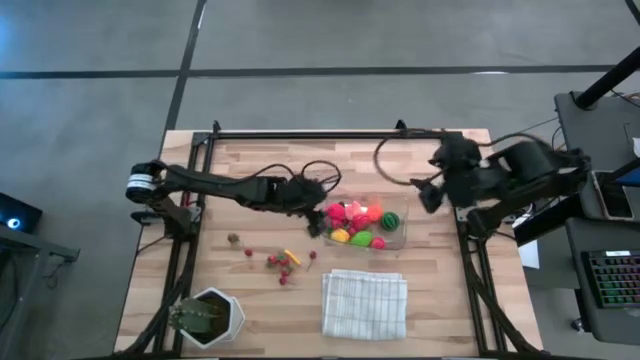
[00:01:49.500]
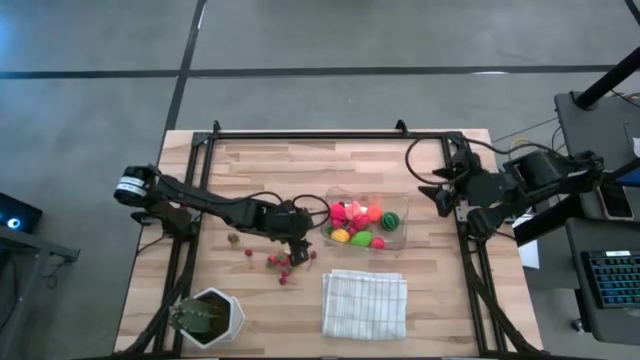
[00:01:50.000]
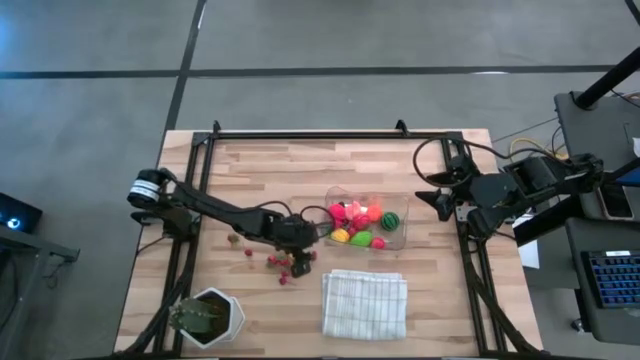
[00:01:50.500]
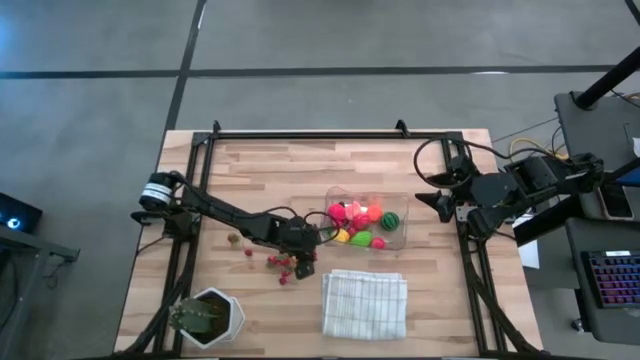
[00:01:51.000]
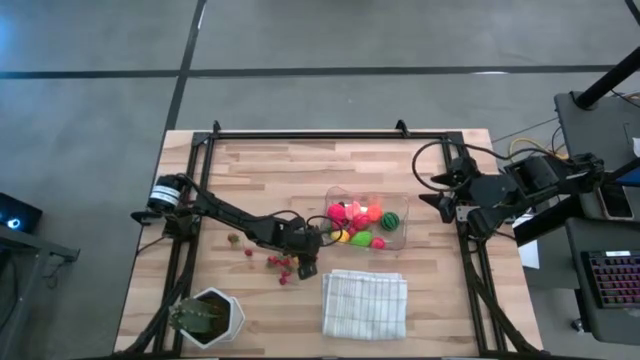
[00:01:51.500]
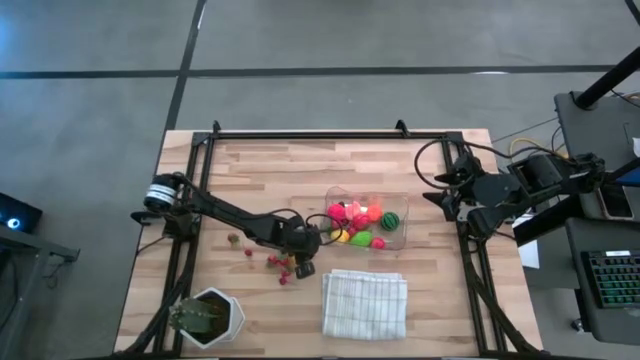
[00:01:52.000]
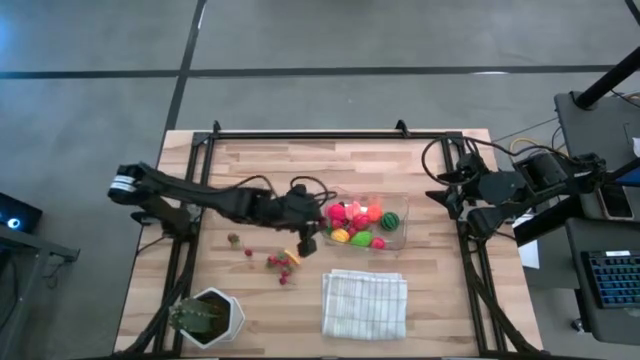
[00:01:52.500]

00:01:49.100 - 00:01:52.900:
Task: Pick and placing Produce into tupperware
Put the red cherry into the transparent bin

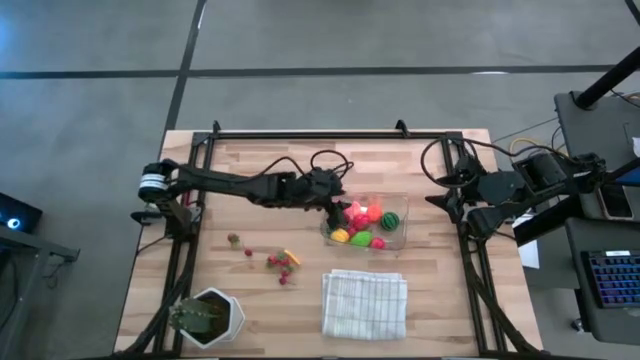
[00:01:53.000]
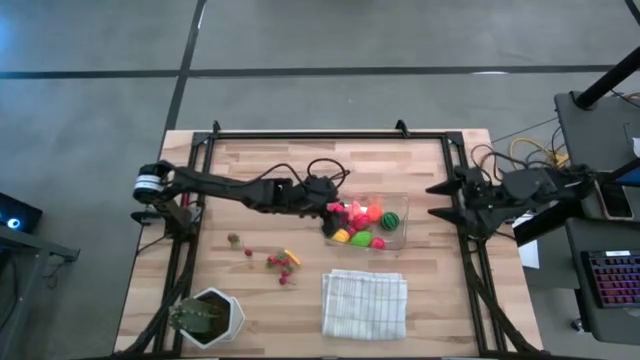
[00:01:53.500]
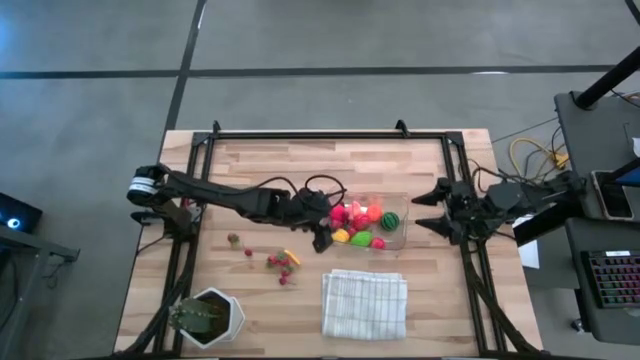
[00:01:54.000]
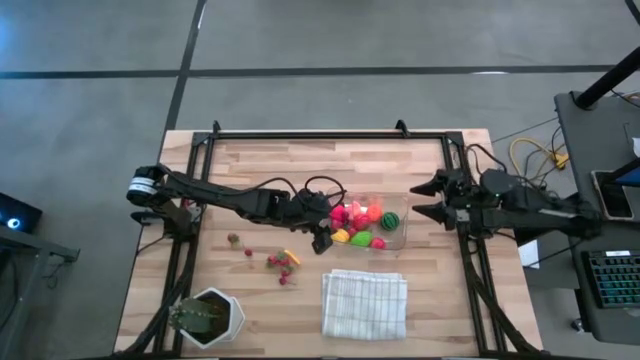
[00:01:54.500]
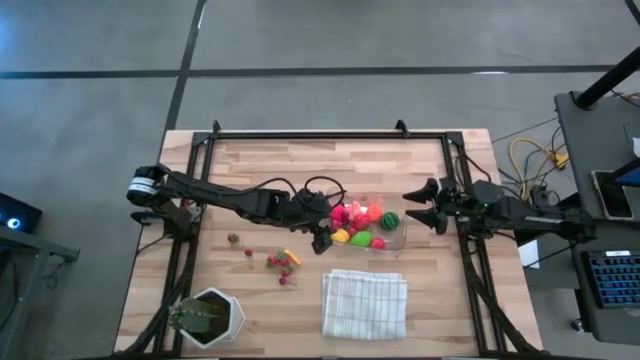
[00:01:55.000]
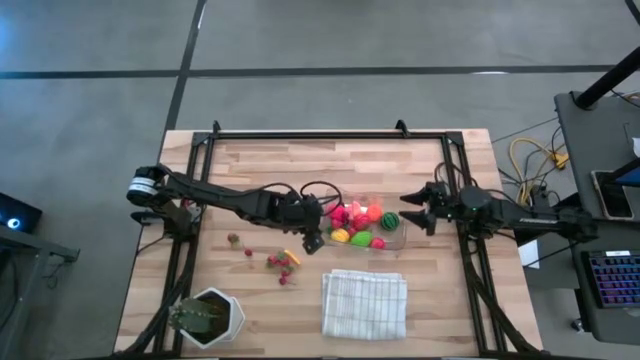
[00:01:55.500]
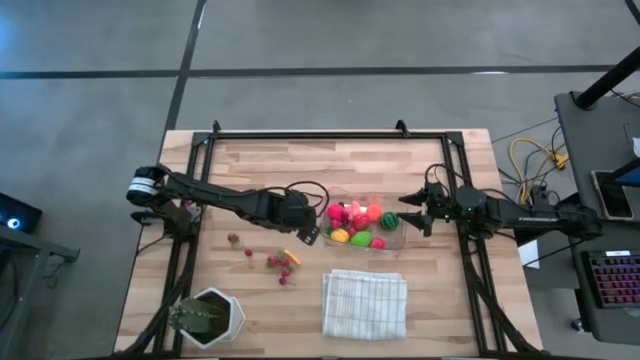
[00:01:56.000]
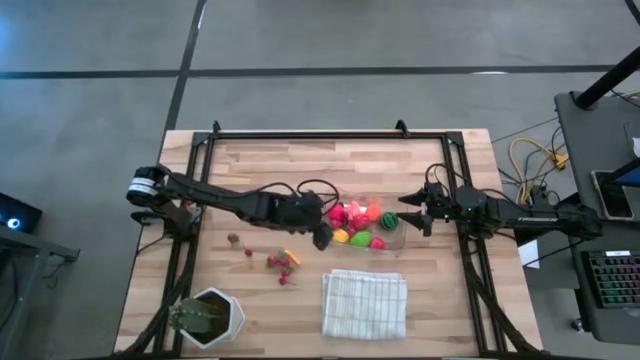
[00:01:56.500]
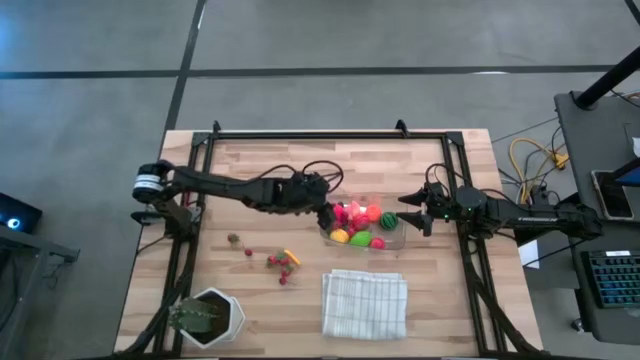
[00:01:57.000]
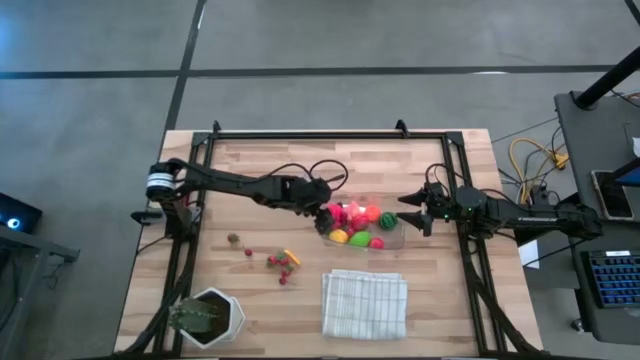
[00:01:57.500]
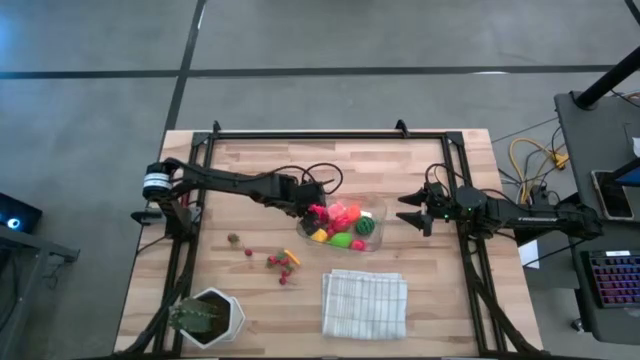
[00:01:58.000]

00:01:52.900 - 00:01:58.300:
Adjust the transparent bin

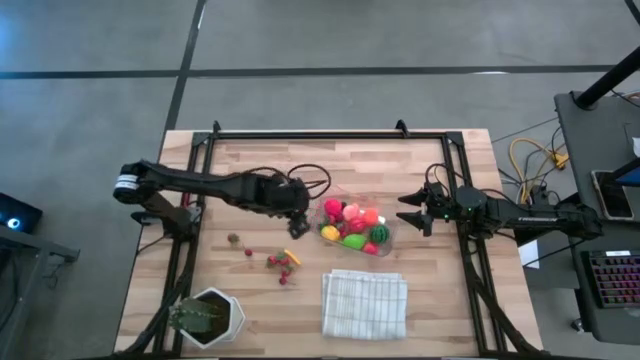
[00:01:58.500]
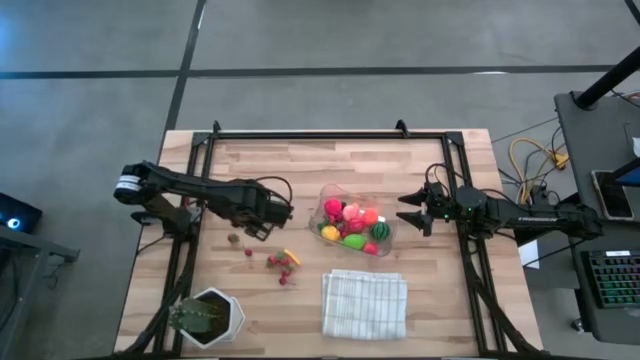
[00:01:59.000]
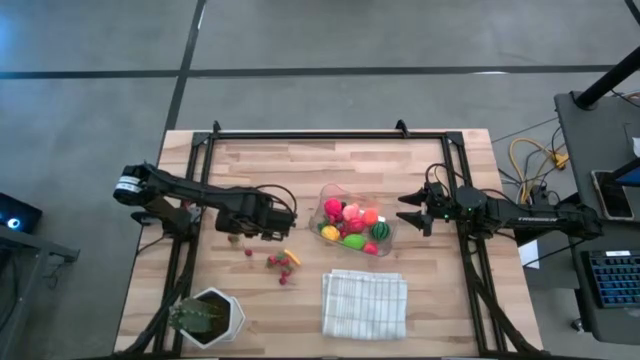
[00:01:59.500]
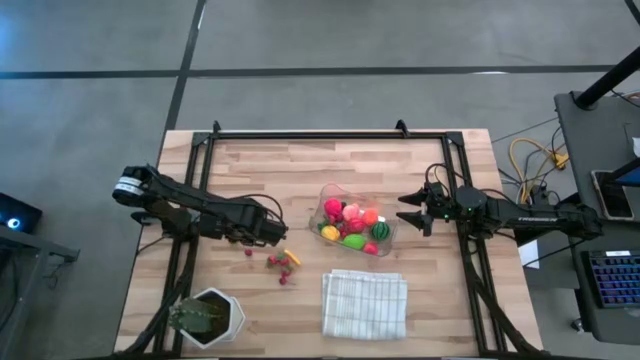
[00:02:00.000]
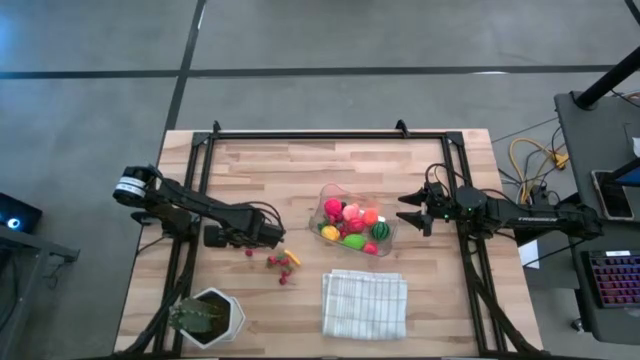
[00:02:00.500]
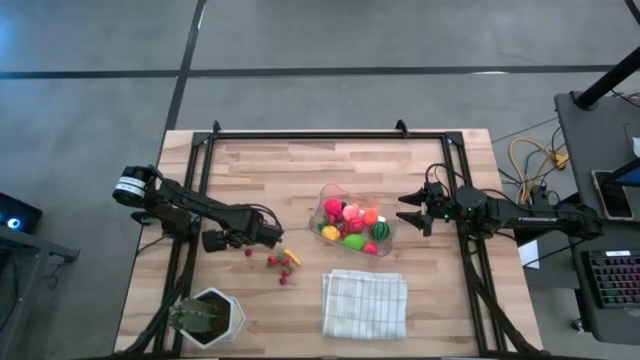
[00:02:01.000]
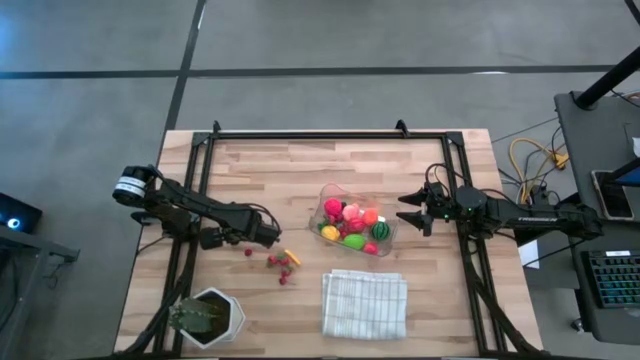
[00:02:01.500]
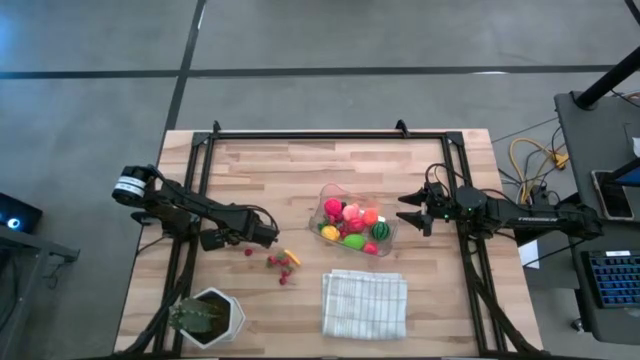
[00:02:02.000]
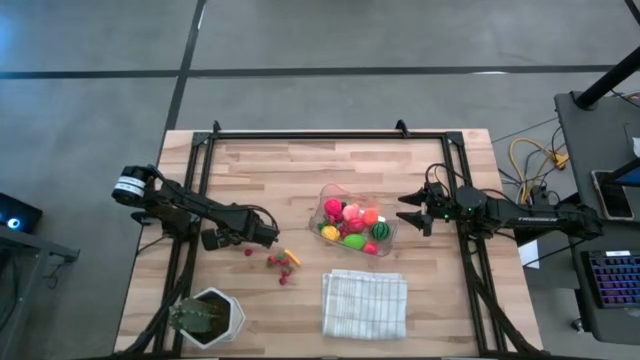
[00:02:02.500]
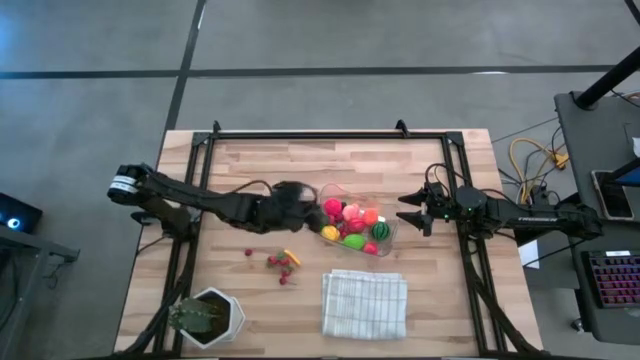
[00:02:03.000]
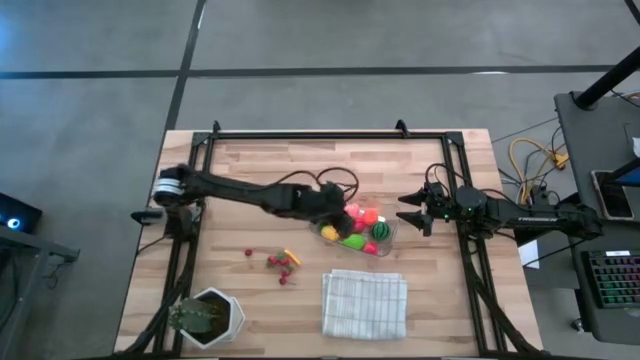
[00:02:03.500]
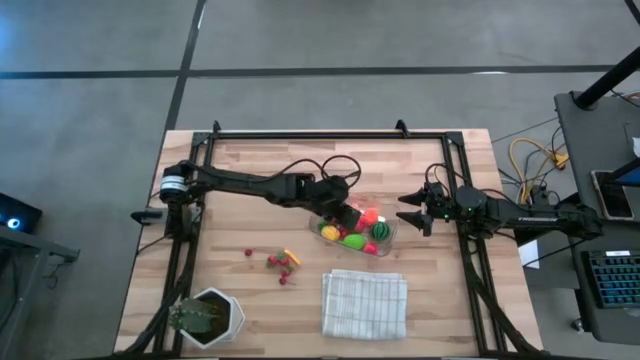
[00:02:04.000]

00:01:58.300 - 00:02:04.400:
Put the red strawberry into the transparent bin

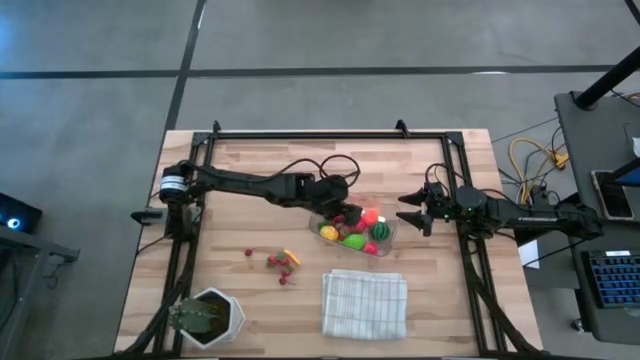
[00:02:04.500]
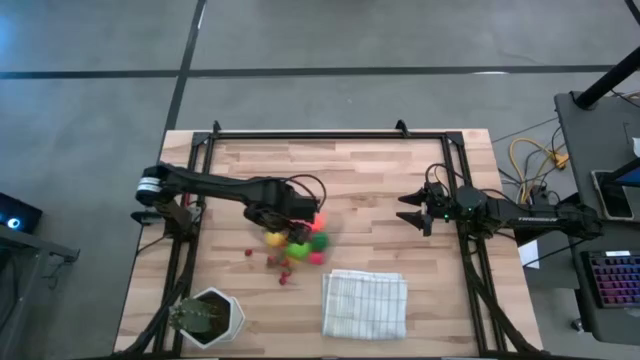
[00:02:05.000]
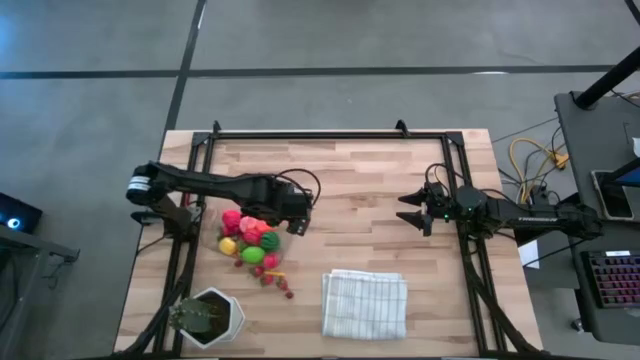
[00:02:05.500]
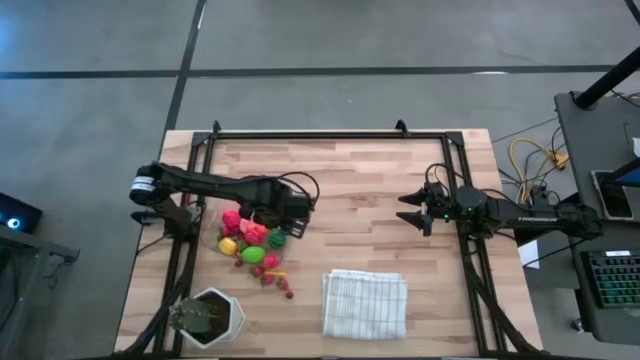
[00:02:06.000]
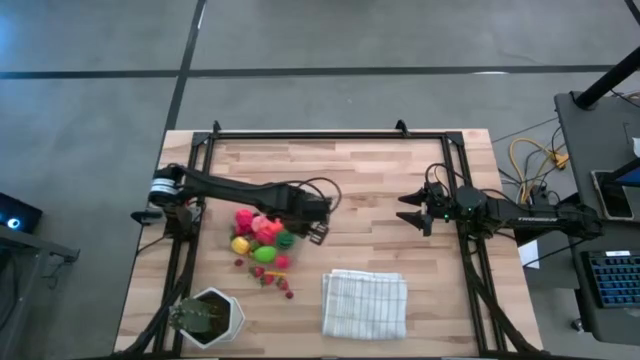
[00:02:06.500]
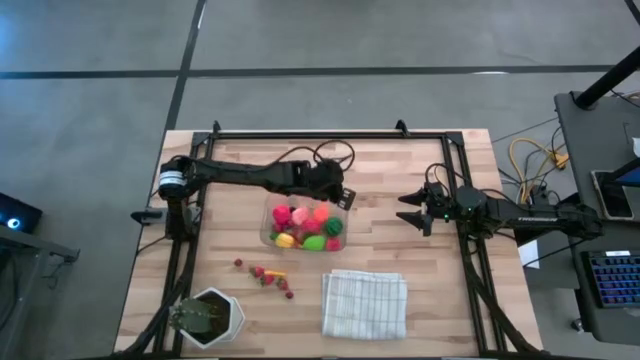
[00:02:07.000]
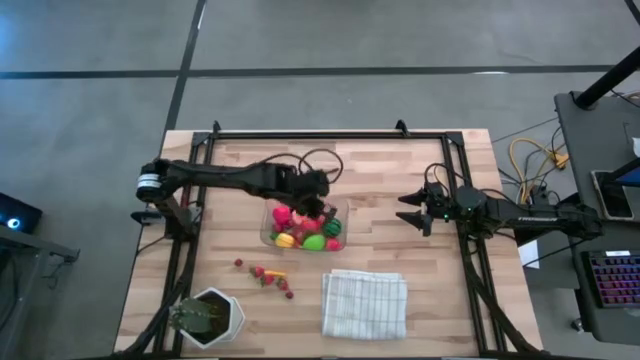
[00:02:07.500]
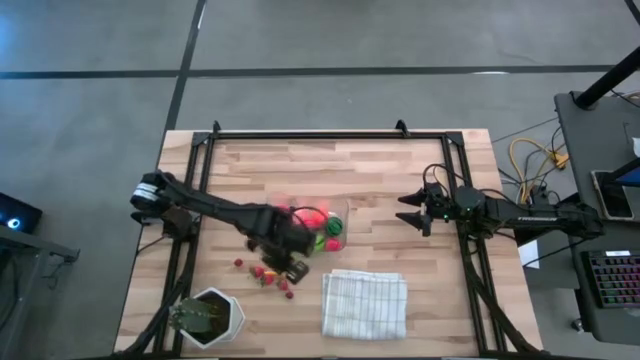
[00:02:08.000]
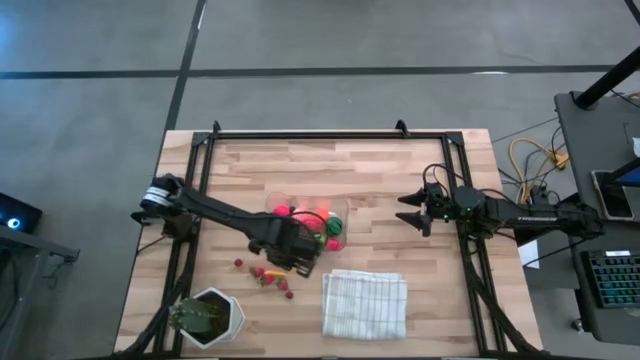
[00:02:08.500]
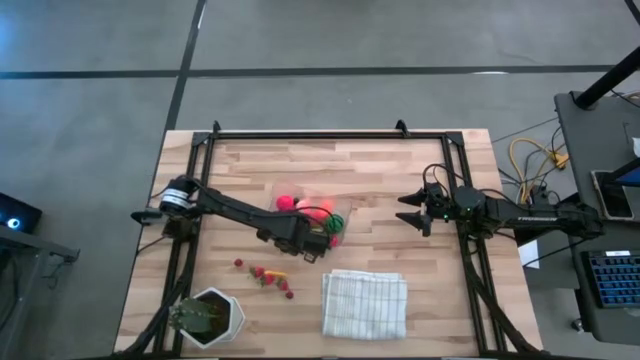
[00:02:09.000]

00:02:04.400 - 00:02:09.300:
Move the transparent bin

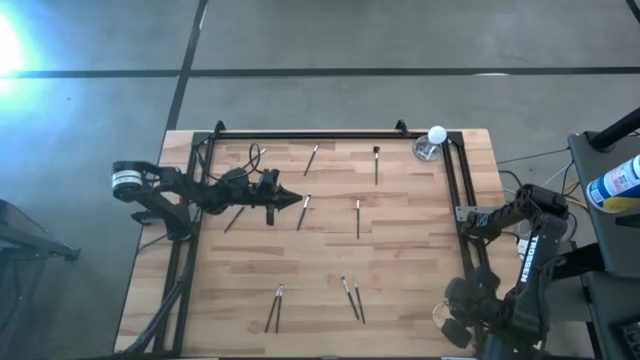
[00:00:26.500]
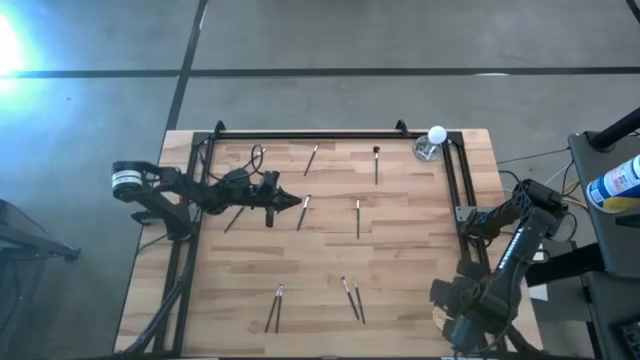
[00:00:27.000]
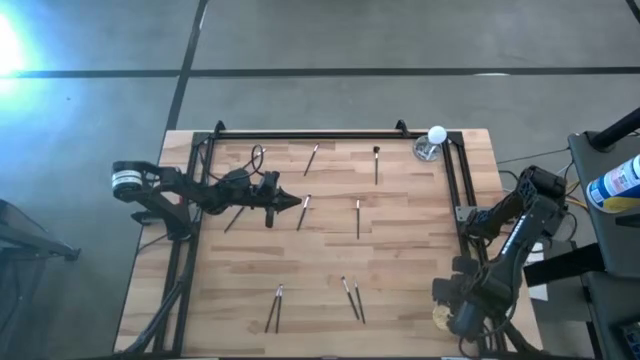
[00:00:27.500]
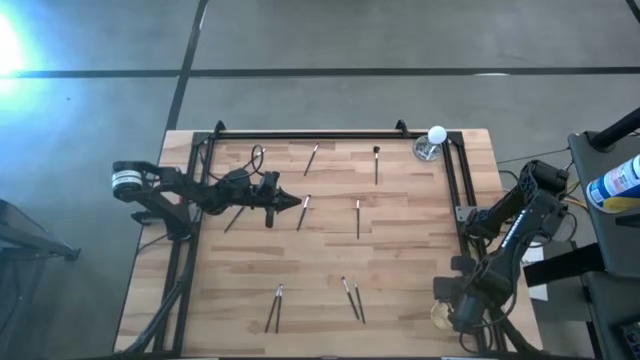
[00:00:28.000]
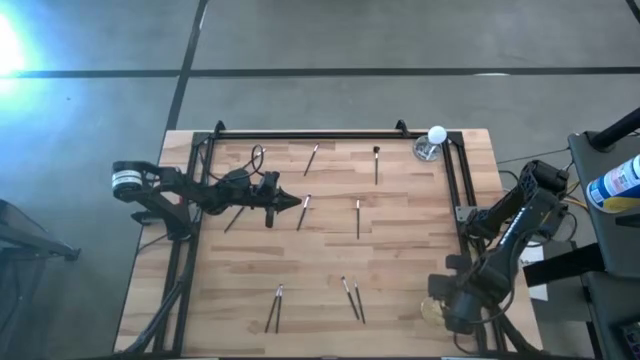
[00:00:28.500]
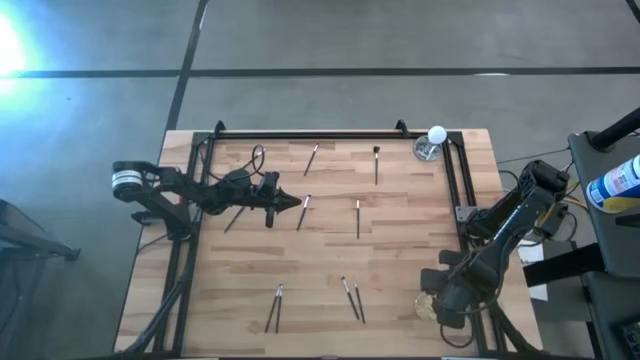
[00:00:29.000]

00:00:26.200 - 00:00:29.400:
Task: Pick & Place Makeup Brushes
Adjust the makeup brush holder
